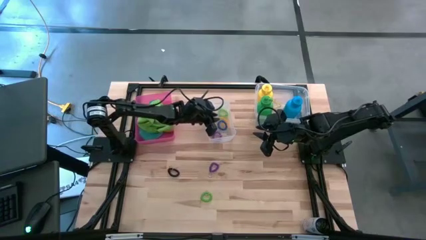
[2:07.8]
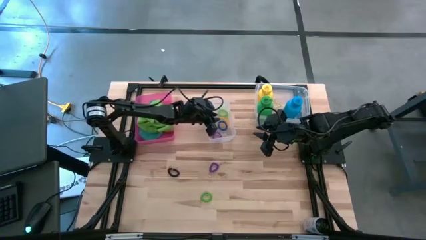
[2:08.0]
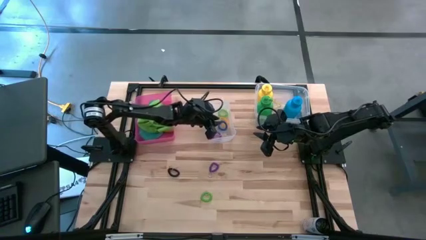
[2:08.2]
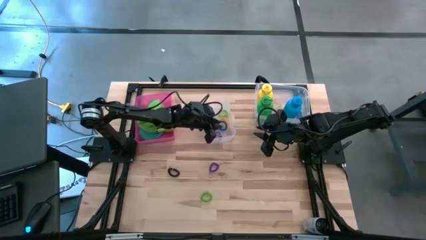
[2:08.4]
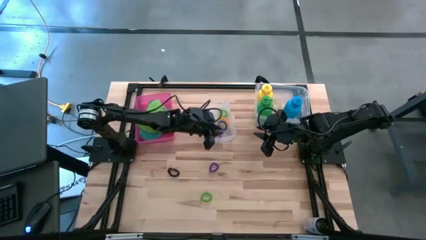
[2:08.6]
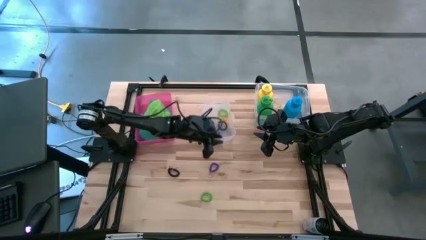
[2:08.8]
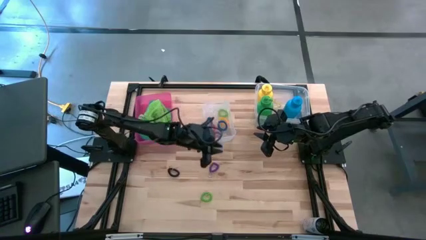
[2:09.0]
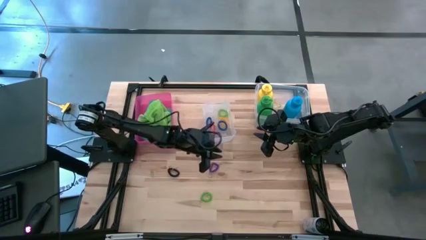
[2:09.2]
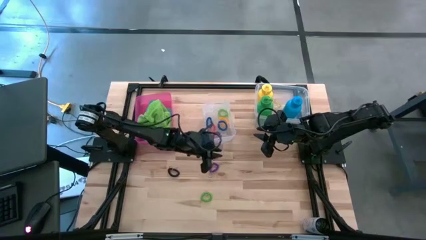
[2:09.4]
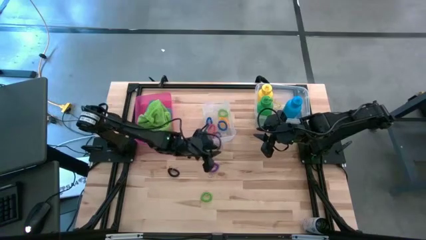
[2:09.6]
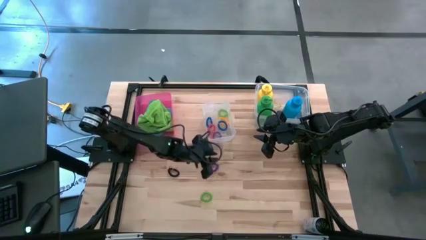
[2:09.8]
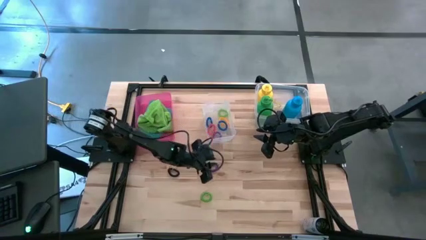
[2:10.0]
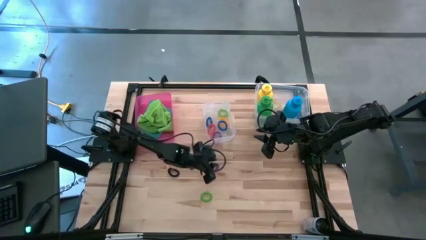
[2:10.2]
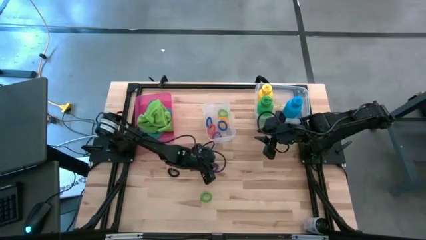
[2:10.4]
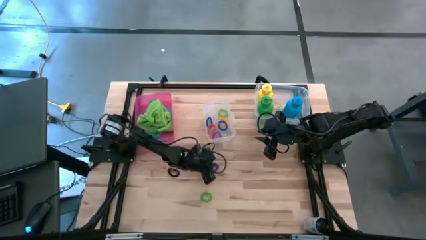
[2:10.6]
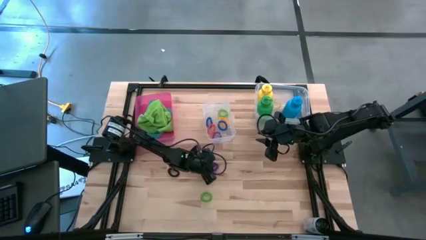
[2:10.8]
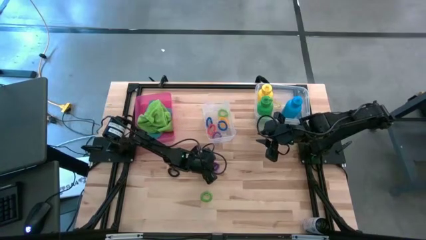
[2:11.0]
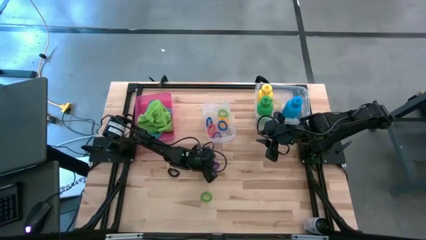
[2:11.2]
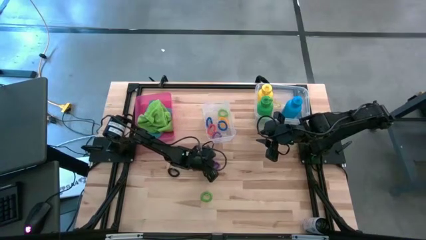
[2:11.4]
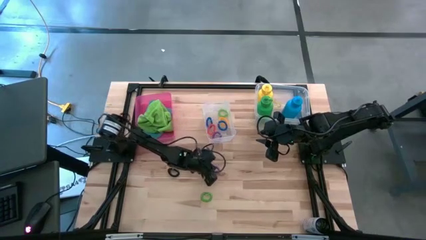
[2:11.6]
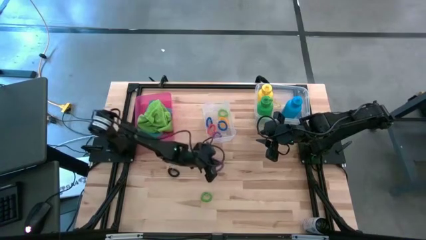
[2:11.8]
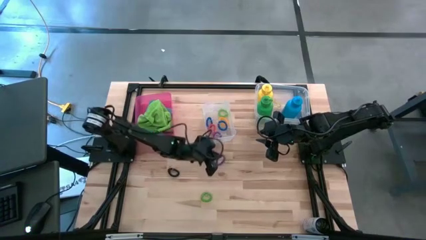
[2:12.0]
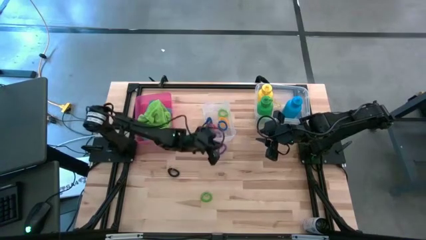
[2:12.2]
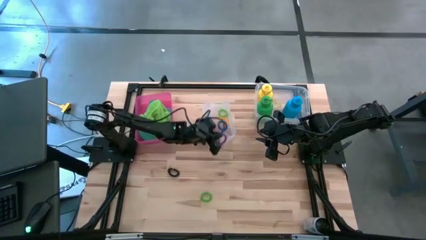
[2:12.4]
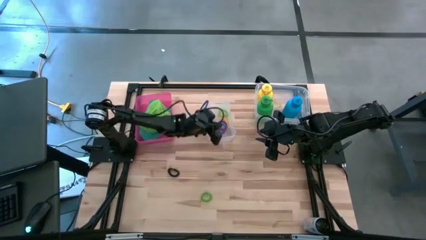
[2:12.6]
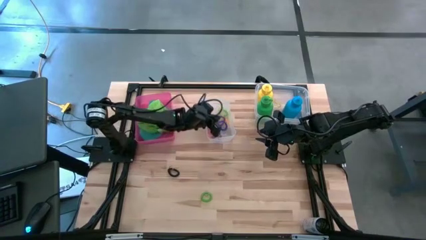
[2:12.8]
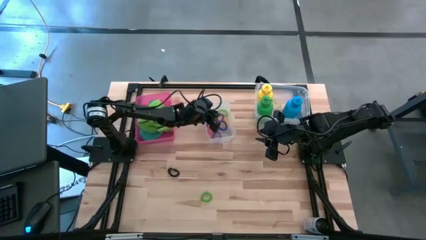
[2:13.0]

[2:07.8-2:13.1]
Task: Pick & Place Sports Items
Put the purple spring keychain into the left transparent bin

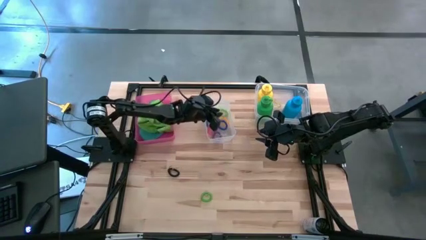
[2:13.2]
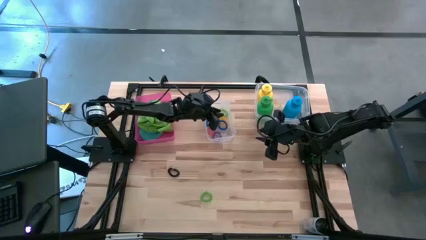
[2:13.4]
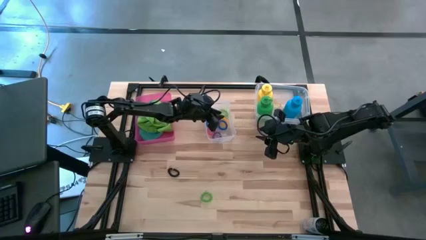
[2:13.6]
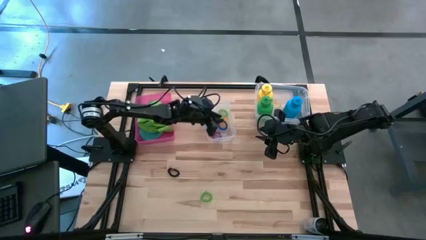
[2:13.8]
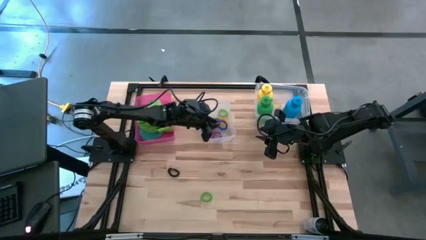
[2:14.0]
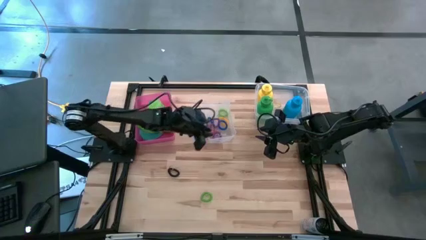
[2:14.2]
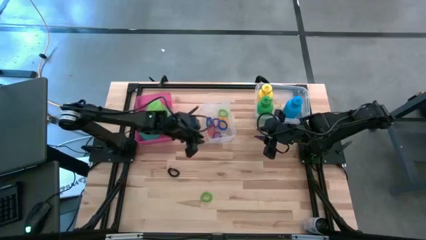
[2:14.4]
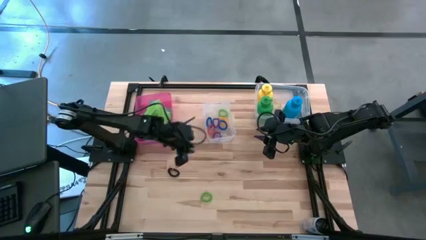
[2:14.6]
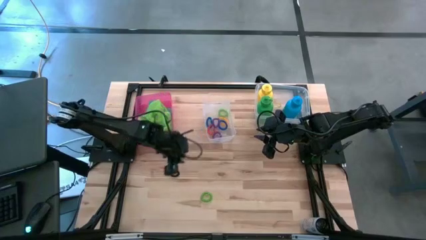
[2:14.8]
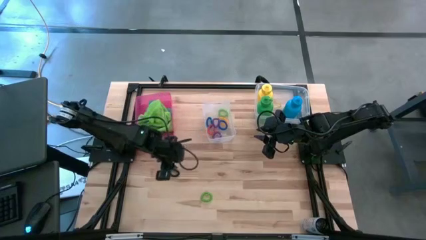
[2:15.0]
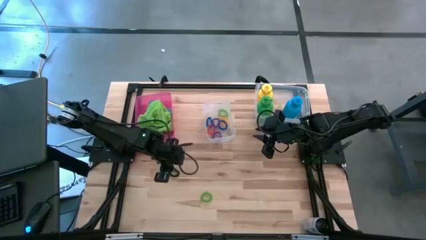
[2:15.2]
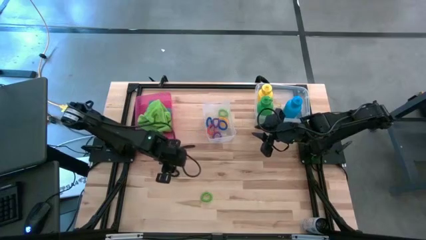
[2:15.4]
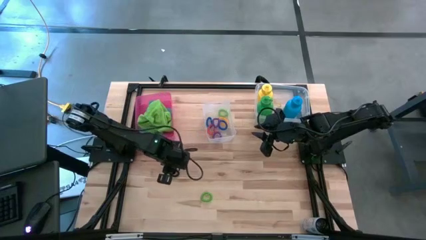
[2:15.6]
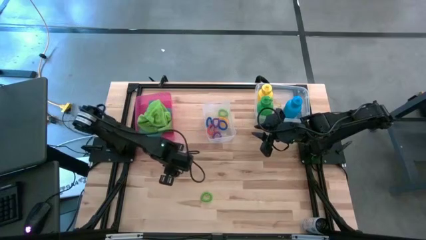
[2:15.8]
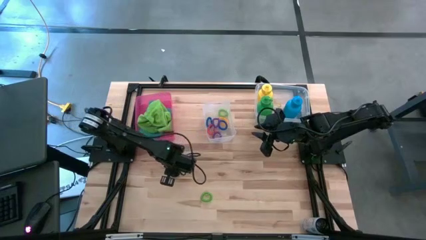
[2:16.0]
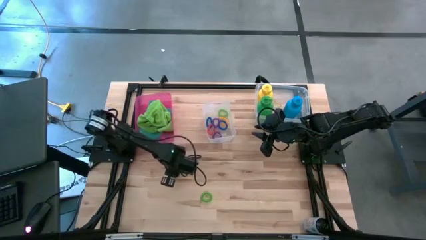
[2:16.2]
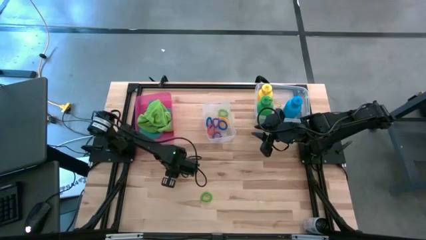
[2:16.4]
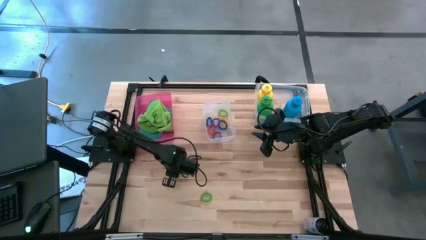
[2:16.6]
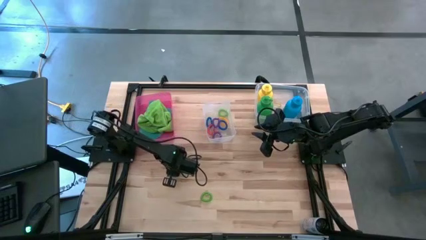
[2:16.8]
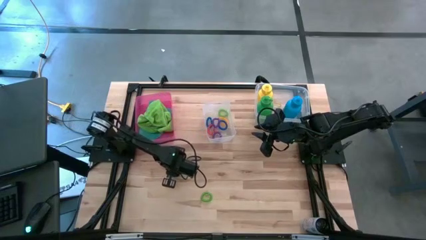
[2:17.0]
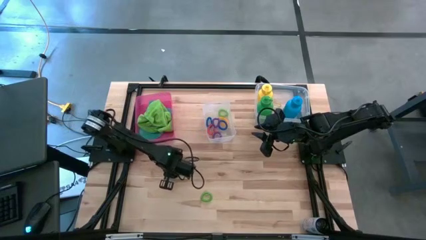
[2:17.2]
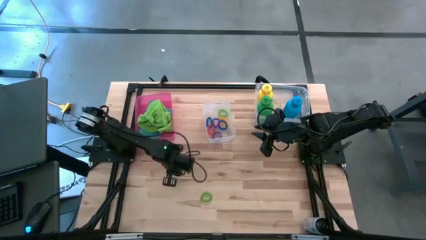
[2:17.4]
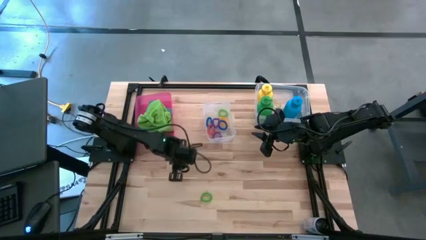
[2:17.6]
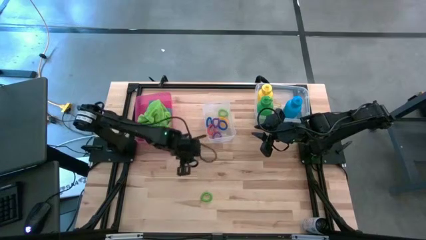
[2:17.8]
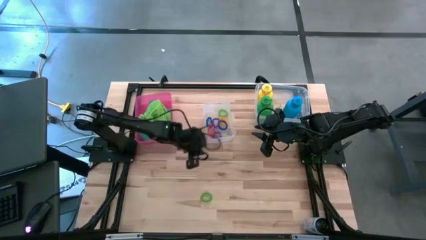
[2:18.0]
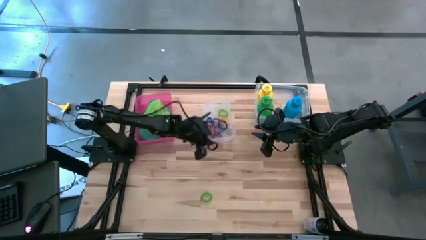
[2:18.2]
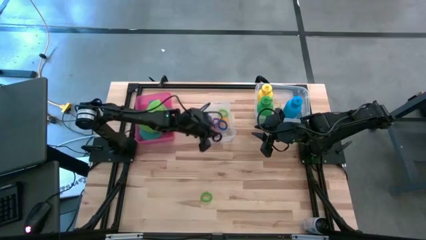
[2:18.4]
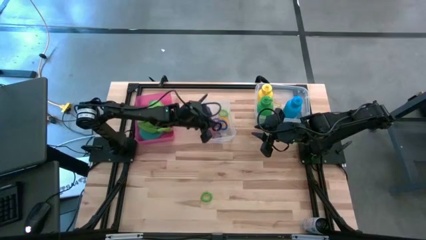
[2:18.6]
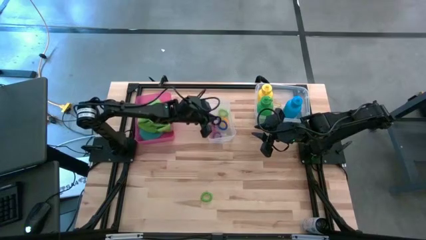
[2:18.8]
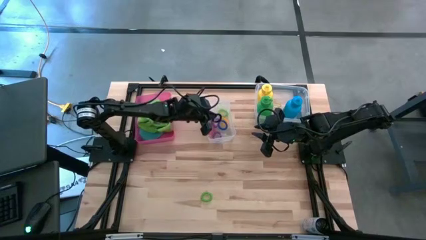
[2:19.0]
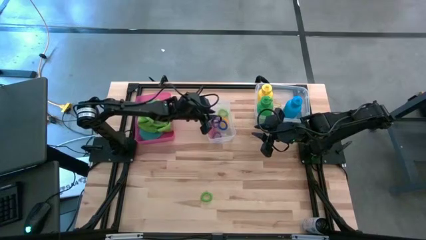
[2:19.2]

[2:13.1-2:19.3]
Put the black spring keychain into the left transparent bin

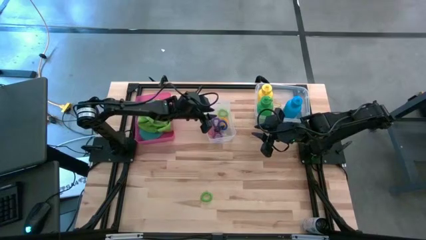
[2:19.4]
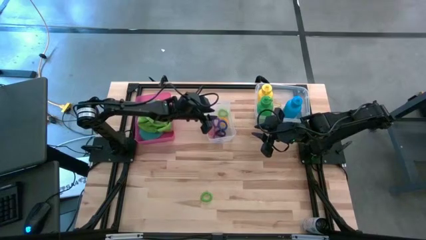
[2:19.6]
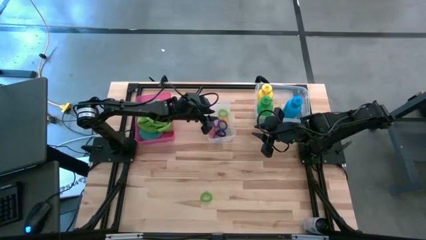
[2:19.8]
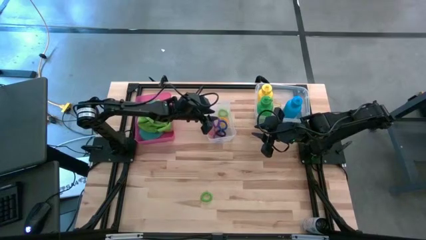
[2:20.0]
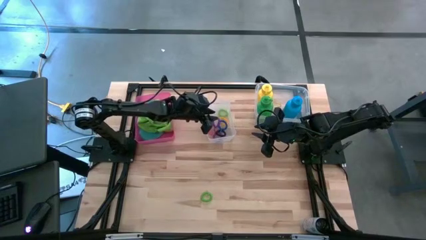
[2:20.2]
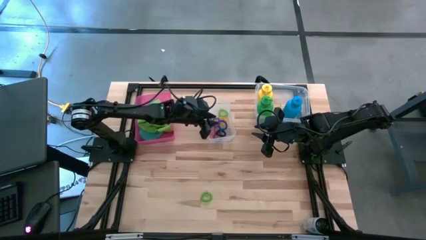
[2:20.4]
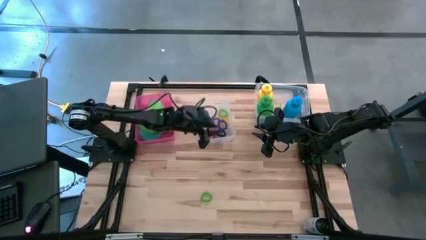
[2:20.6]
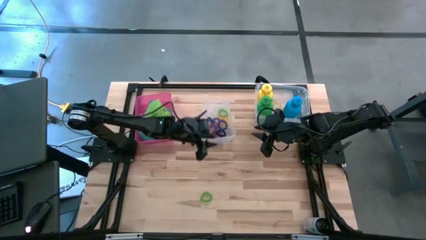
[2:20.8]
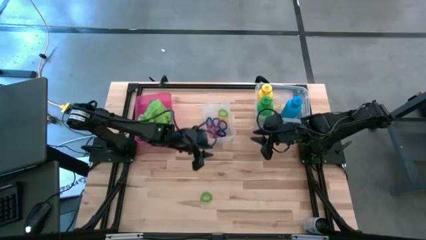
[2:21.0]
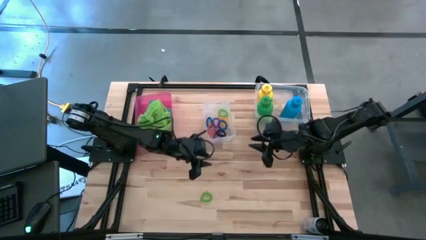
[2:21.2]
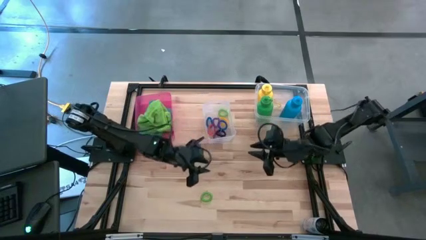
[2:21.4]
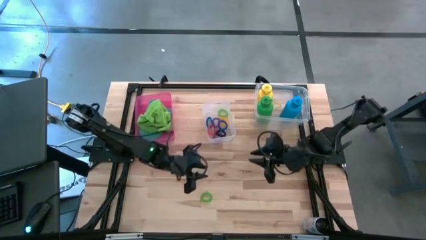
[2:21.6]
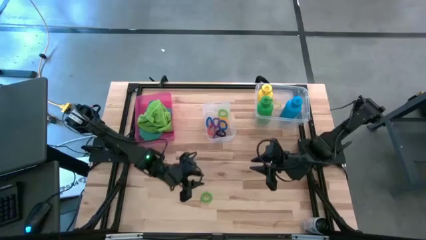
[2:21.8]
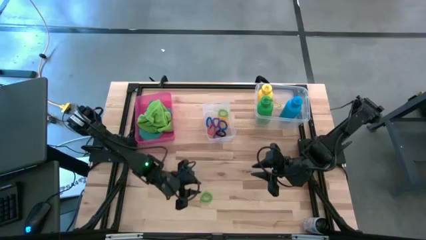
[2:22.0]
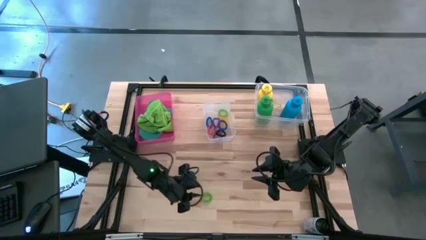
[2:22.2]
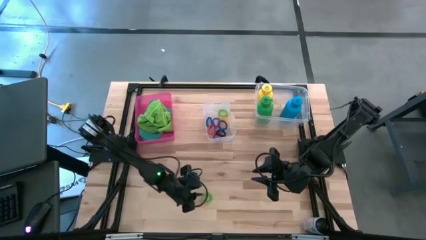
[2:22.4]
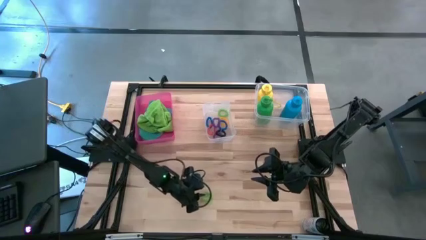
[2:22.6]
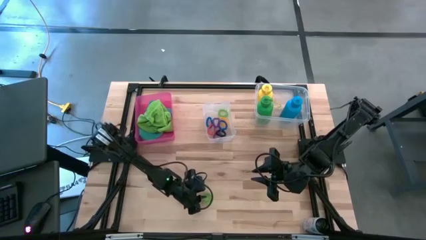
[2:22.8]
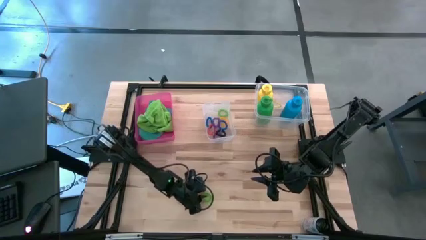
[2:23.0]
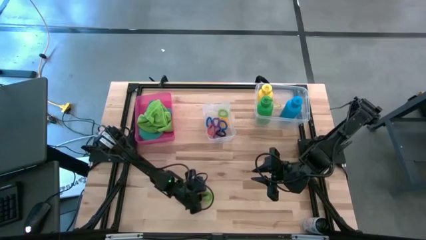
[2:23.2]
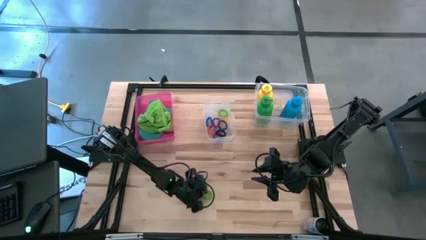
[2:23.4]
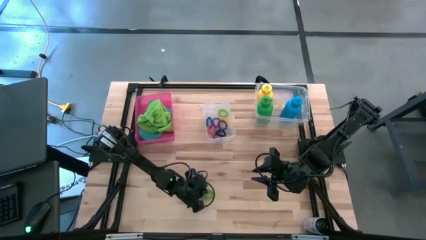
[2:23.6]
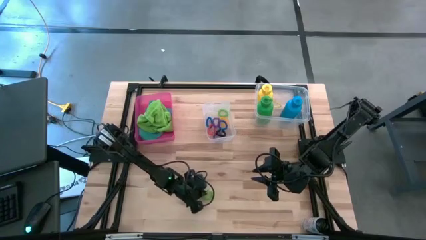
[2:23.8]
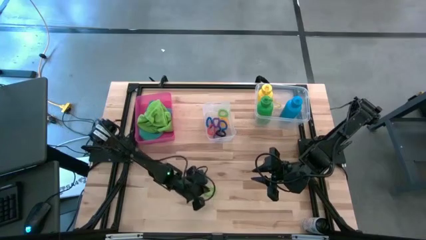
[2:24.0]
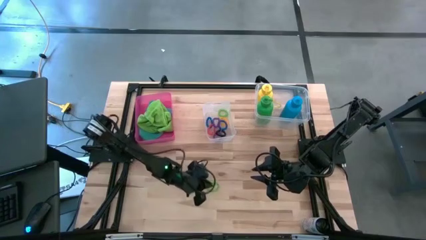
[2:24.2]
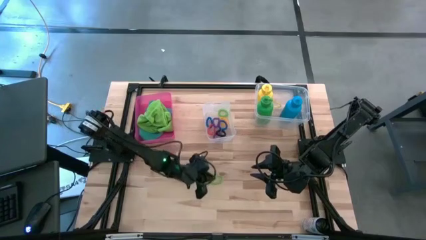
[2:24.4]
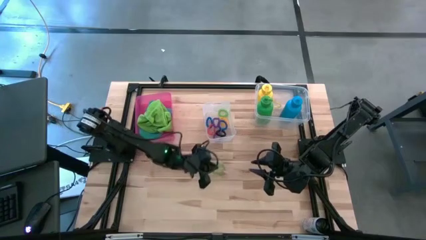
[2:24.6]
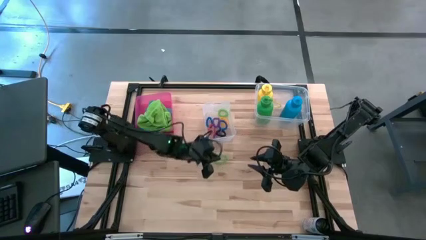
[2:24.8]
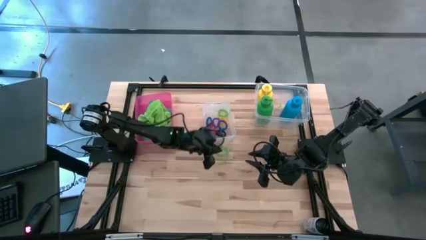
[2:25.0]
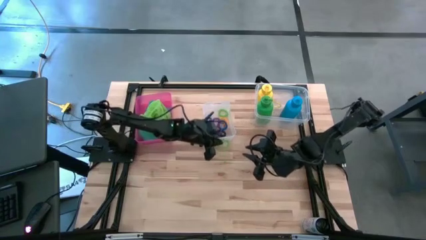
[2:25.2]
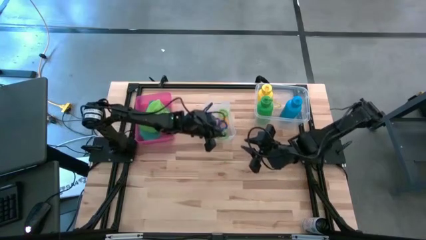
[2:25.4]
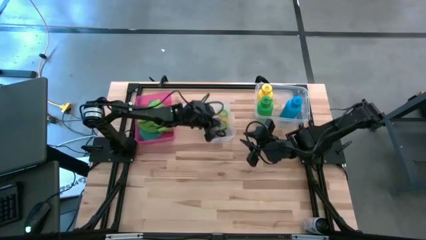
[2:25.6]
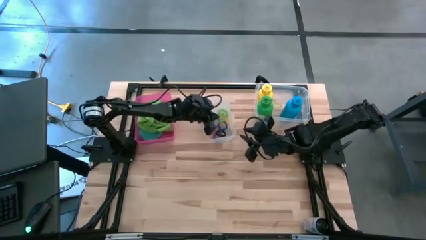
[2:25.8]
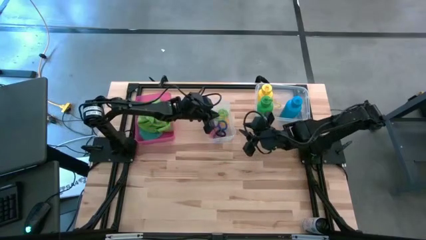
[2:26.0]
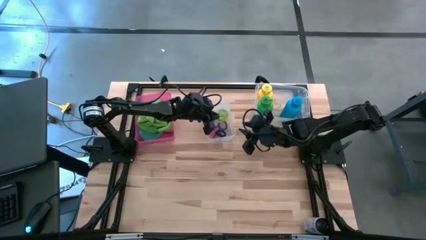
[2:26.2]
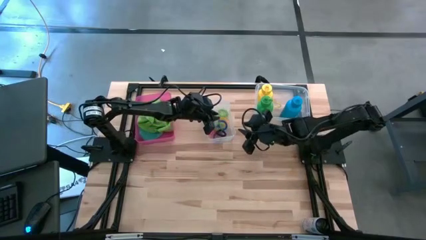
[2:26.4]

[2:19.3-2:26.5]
Put the green spring keychain into the left transparent bin
